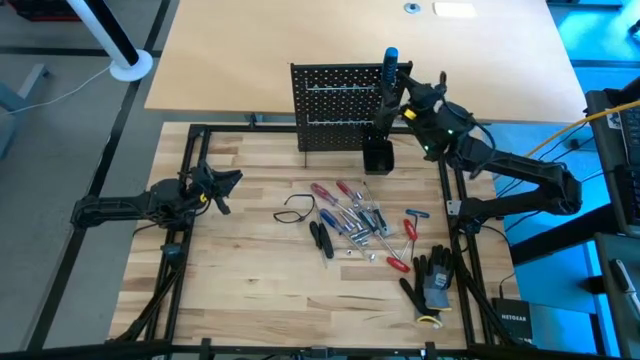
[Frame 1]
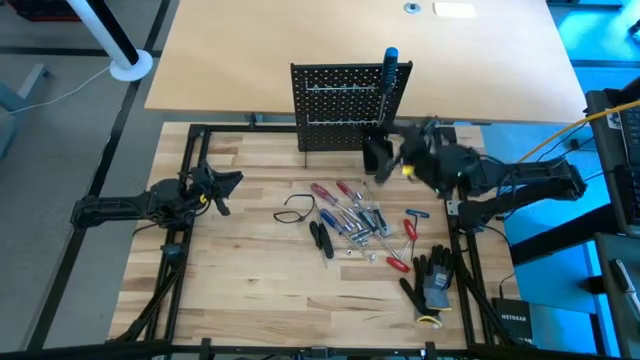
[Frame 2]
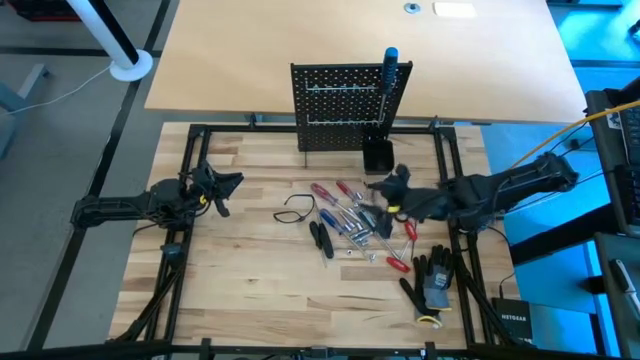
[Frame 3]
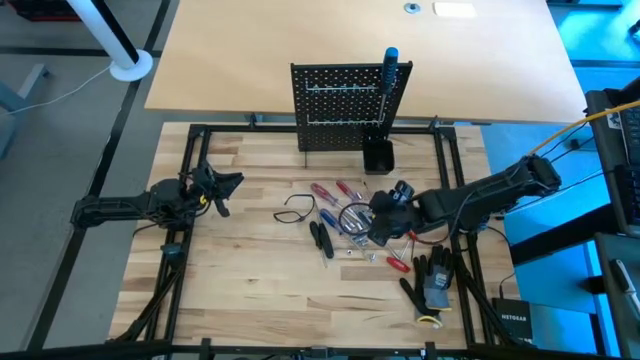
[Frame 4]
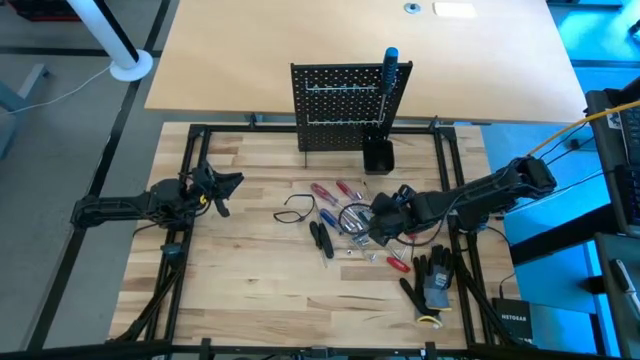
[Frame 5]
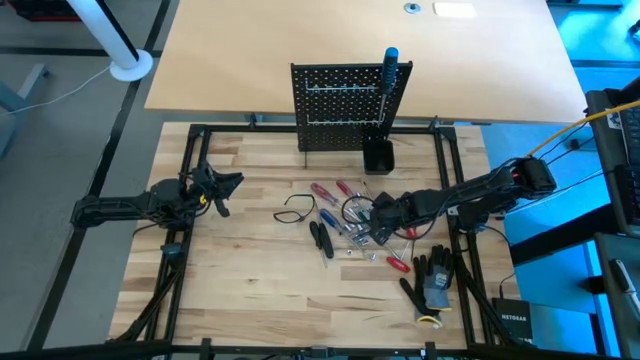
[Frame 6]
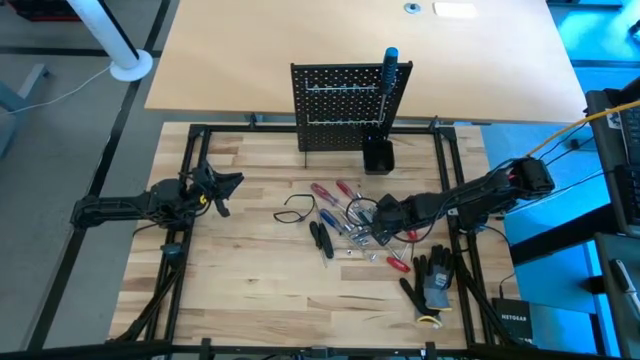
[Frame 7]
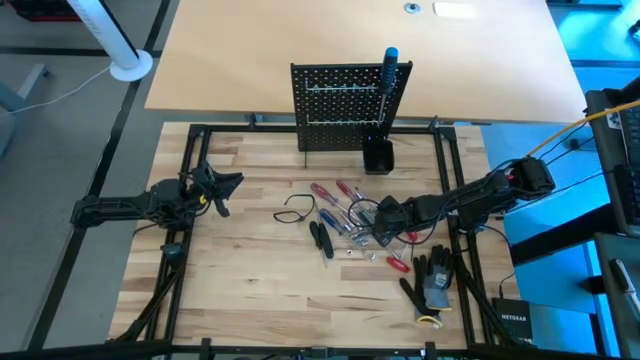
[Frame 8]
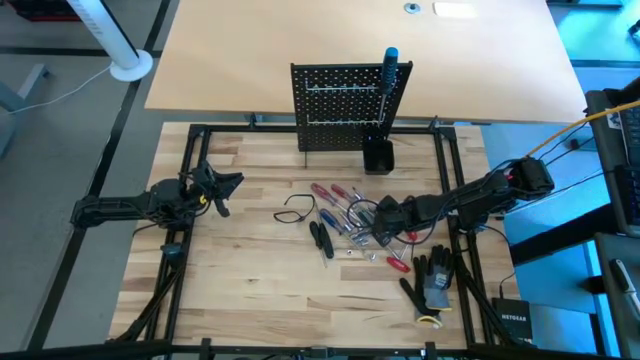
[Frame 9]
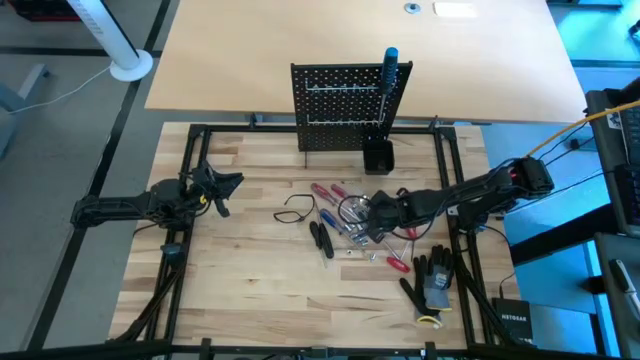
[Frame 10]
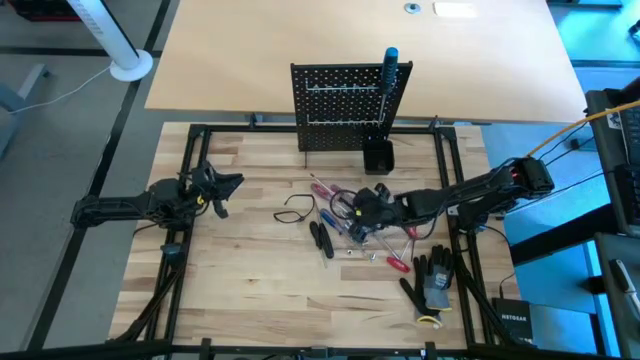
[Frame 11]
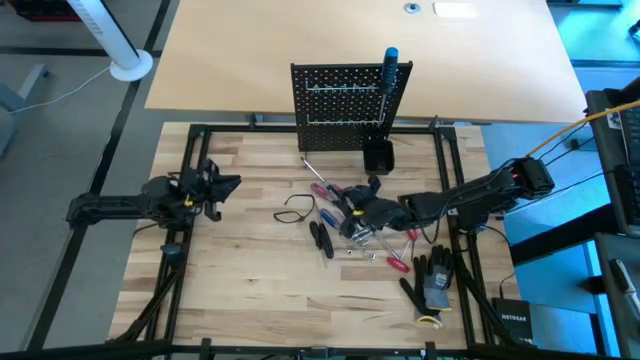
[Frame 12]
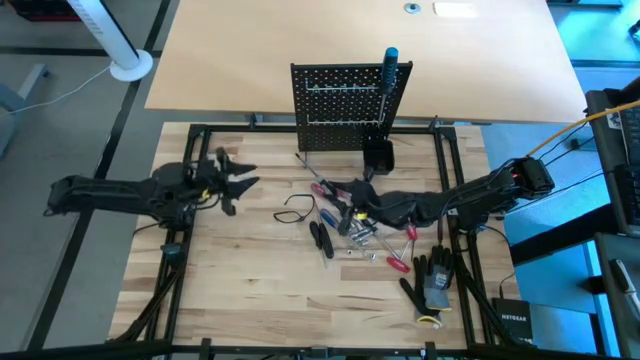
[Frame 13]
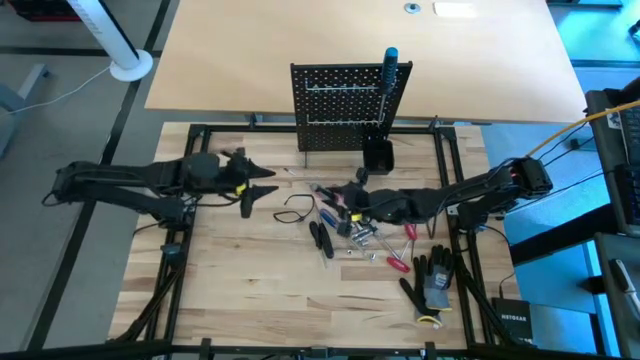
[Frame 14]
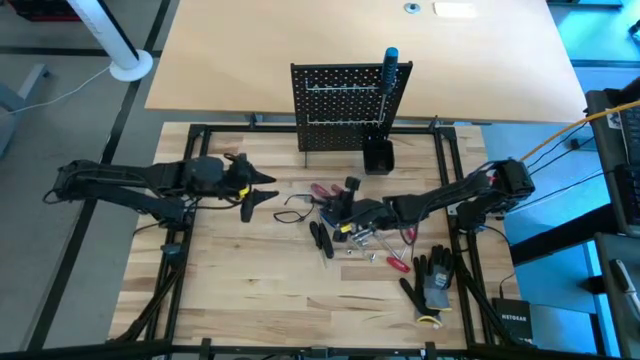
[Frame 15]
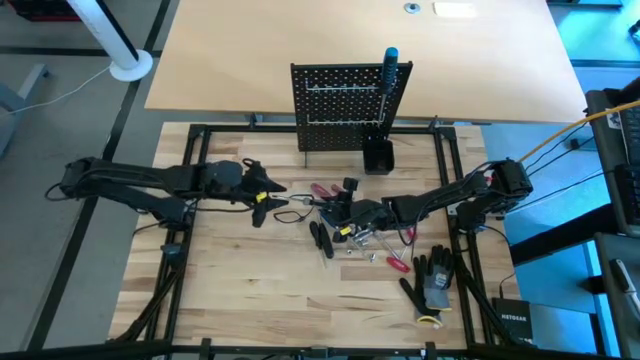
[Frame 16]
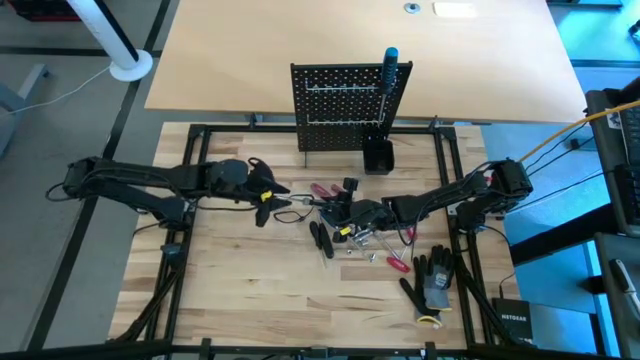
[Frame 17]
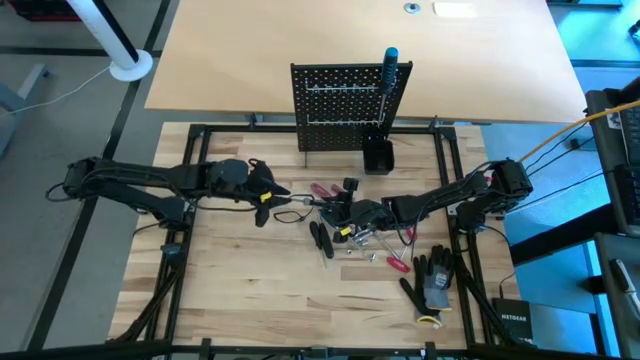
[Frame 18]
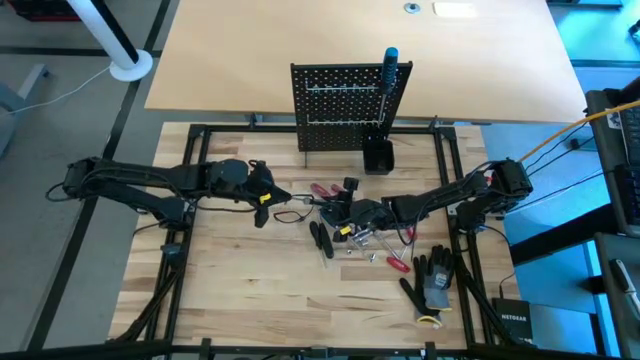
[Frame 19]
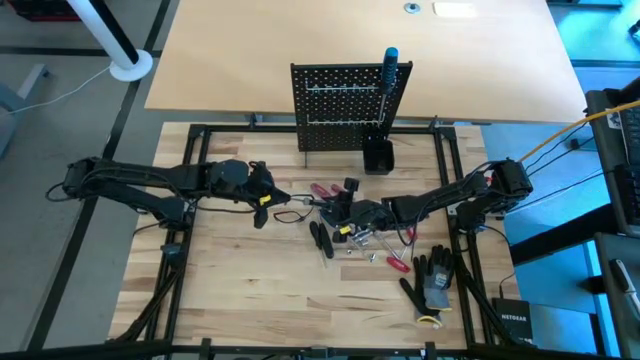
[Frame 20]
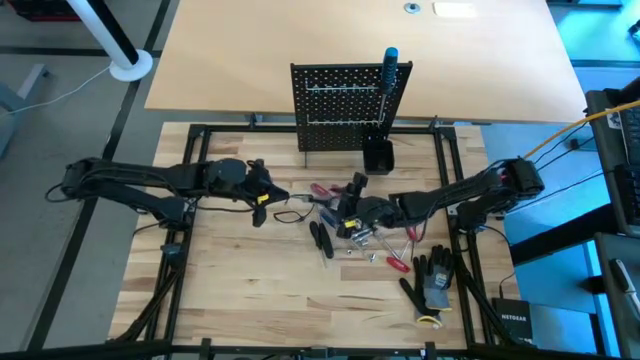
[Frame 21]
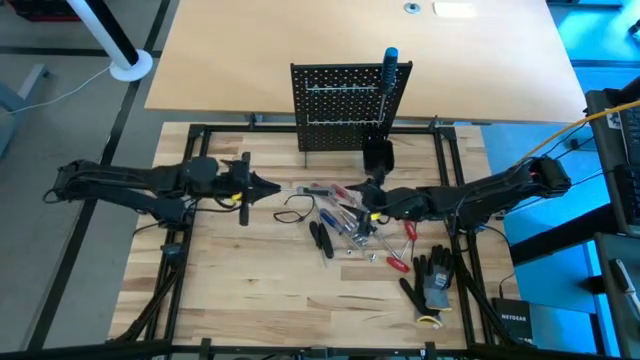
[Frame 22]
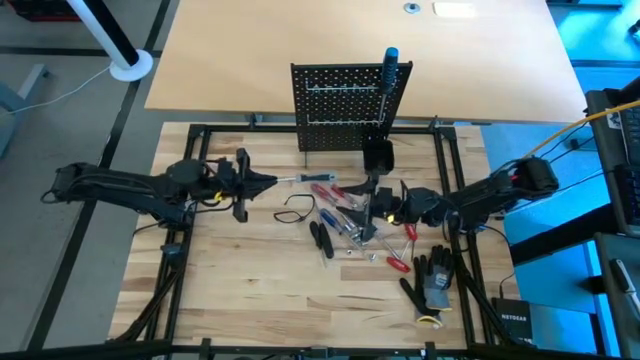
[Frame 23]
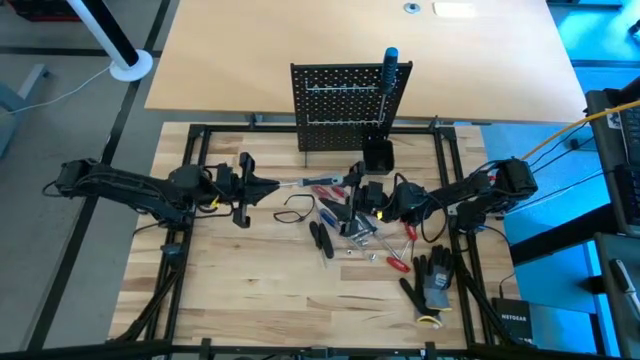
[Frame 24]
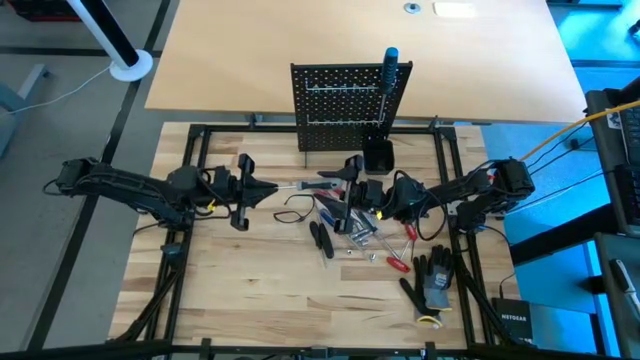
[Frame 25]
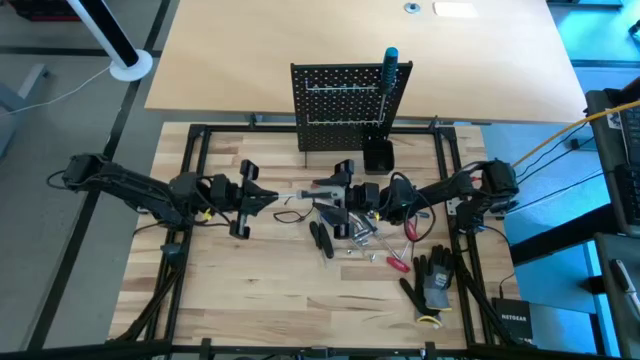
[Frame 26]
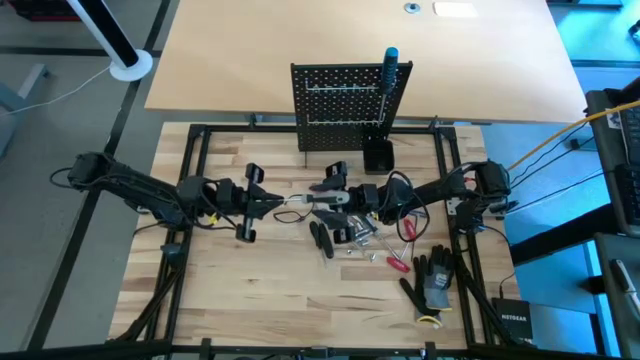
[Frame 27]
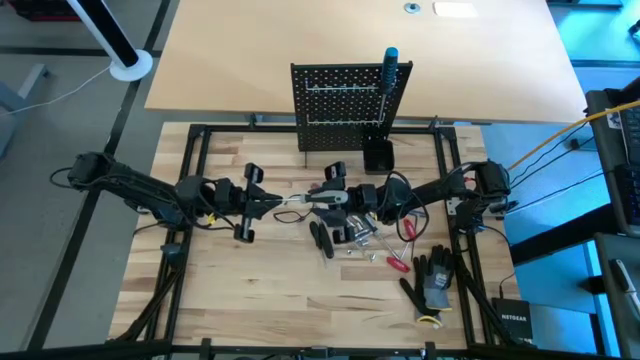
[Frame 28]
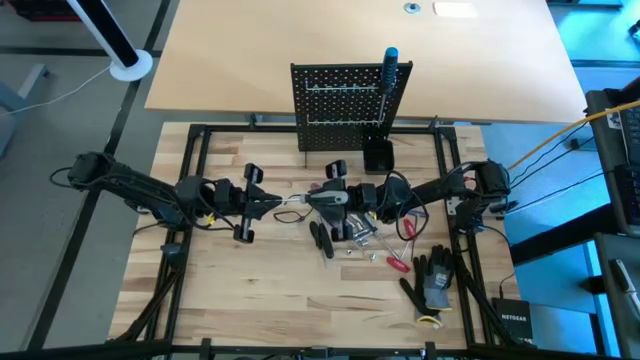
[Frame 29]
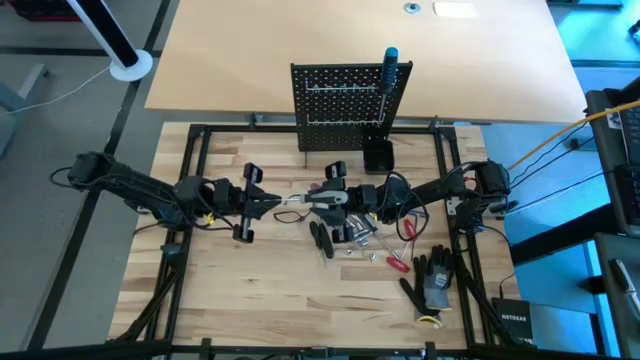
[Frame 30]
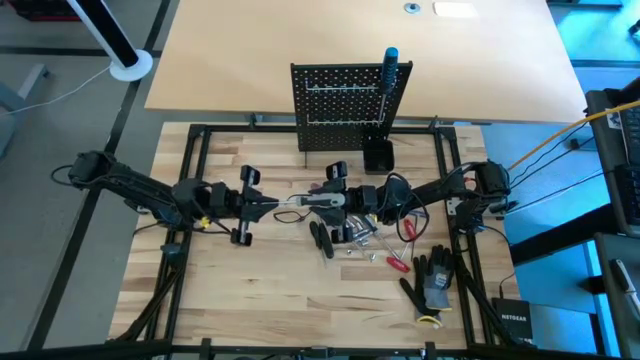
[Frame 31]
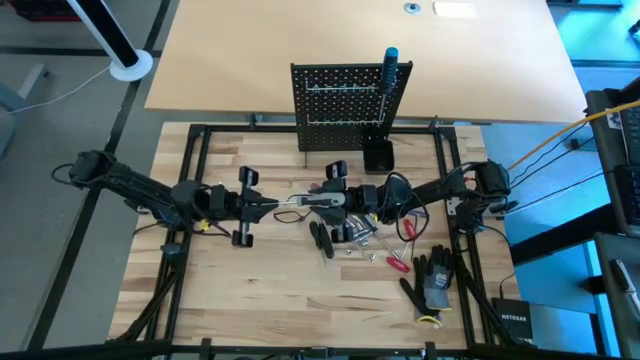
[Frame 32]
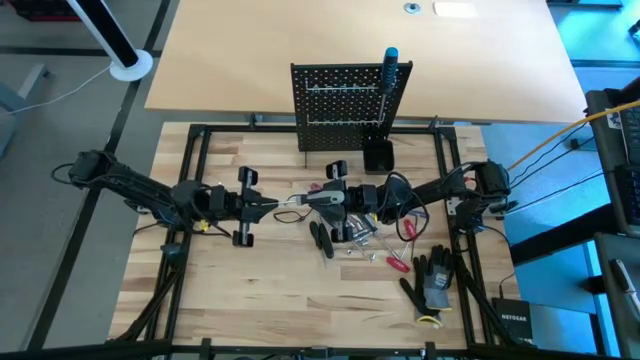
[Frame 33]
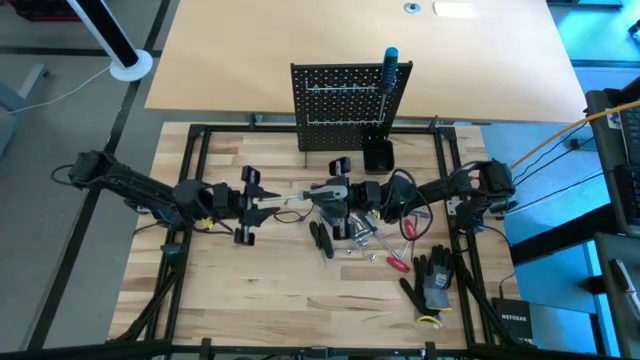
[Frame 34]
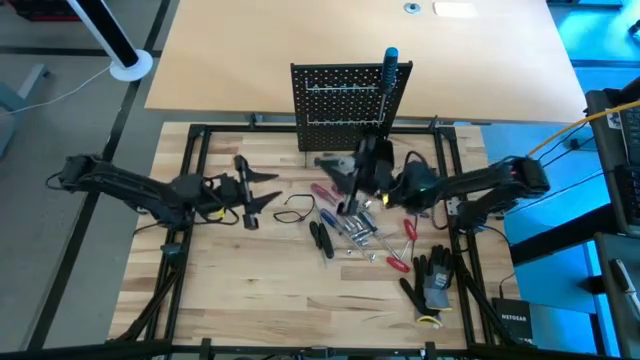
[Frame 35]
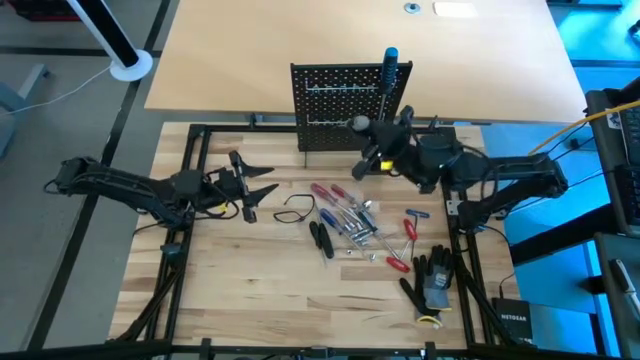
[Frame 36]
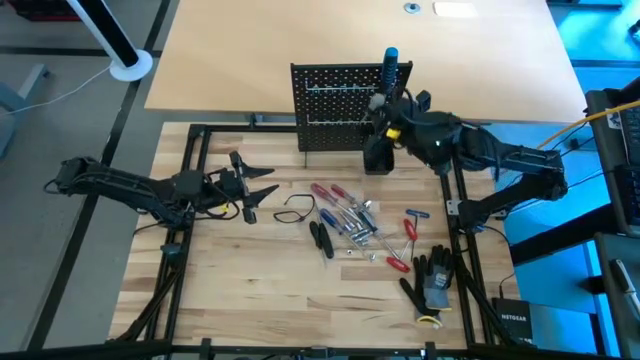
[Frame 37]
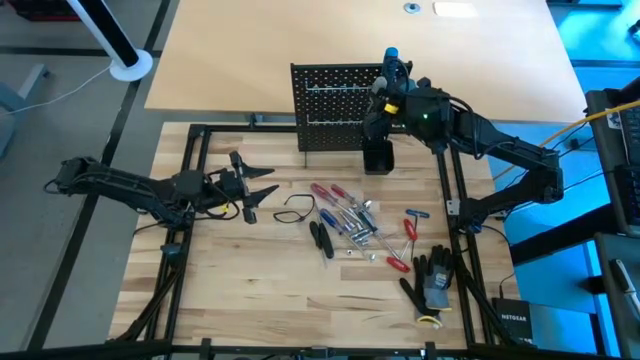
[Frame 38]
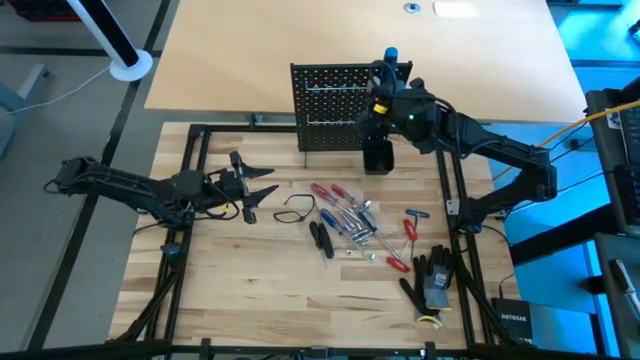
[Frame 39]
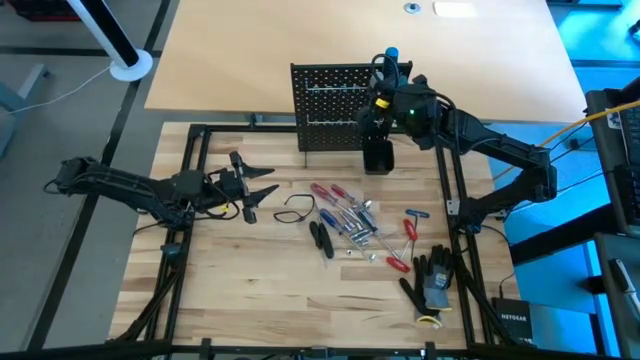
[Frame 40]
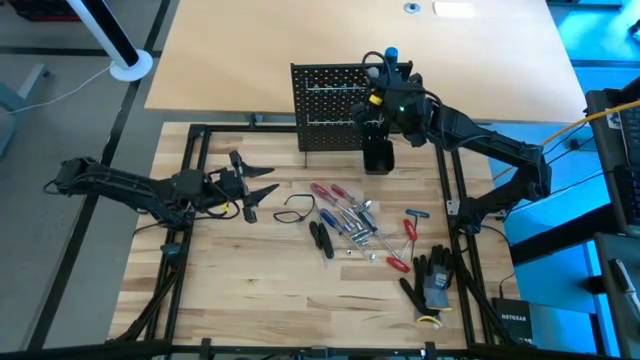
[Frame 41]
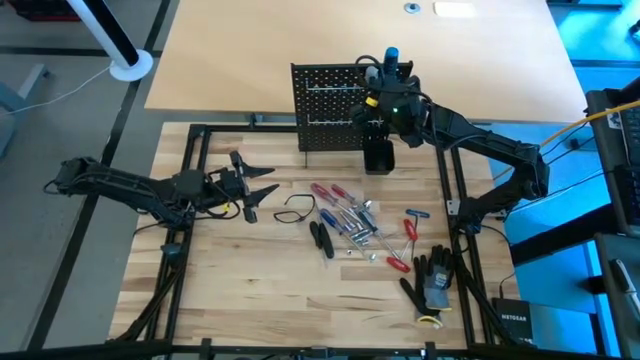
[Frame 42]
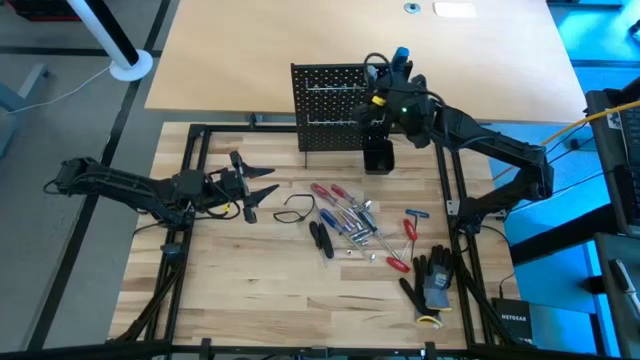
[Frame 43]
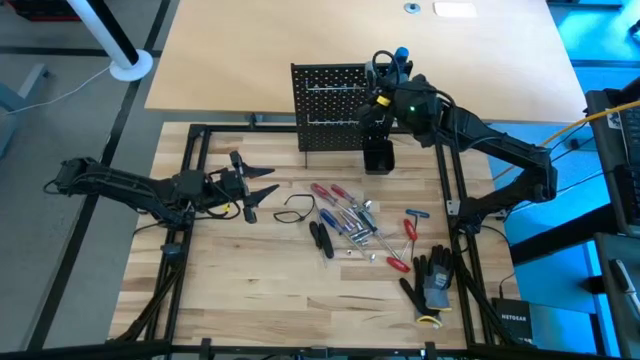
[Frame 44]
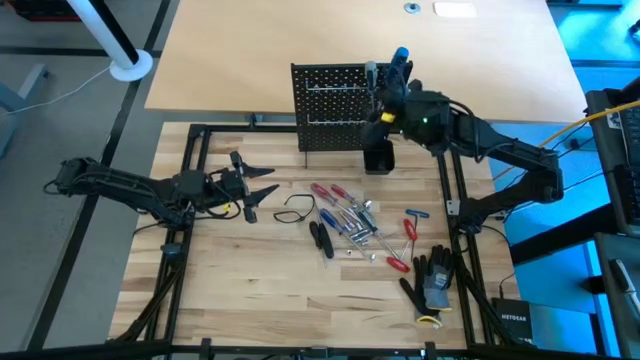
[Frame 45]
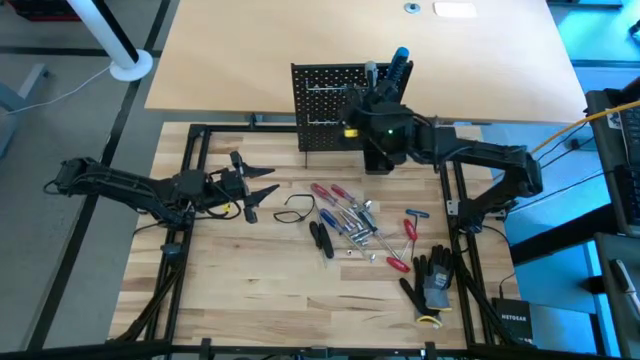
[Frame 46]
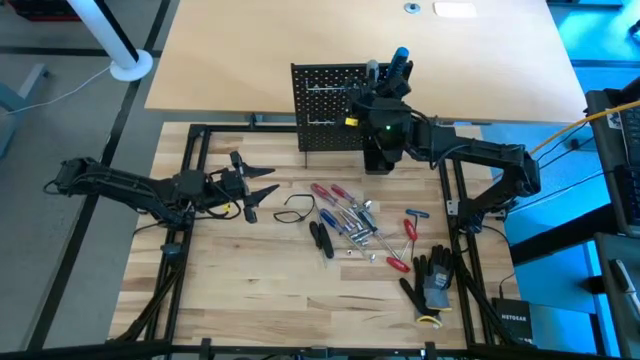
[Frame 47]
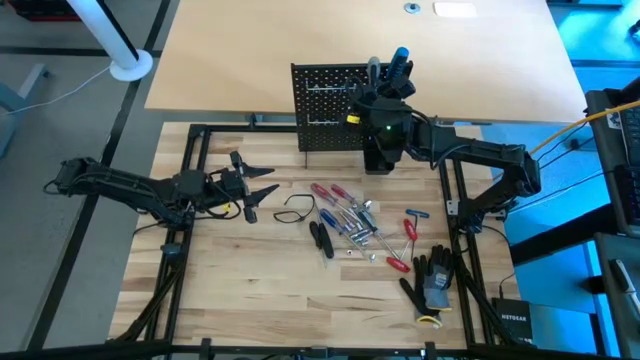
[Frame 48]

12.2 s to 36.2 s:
Task: Hang tools onto peg board
Hang the gray screwdriver on the peg board
